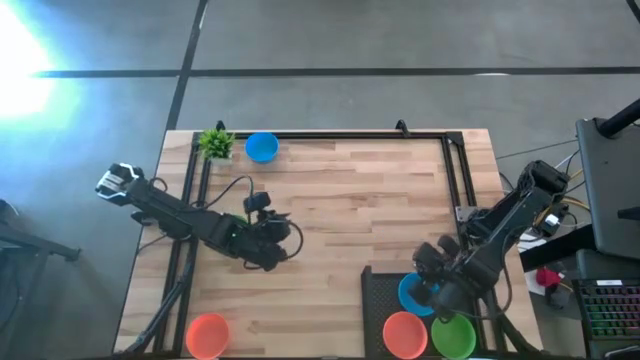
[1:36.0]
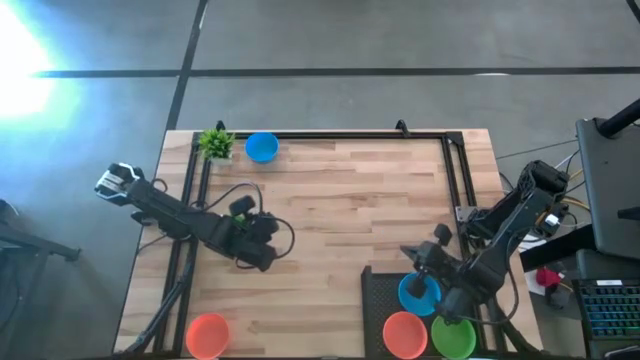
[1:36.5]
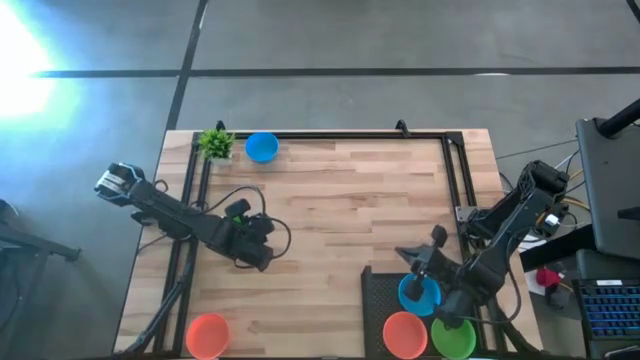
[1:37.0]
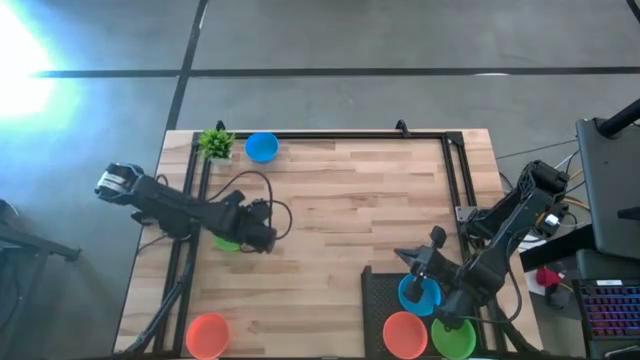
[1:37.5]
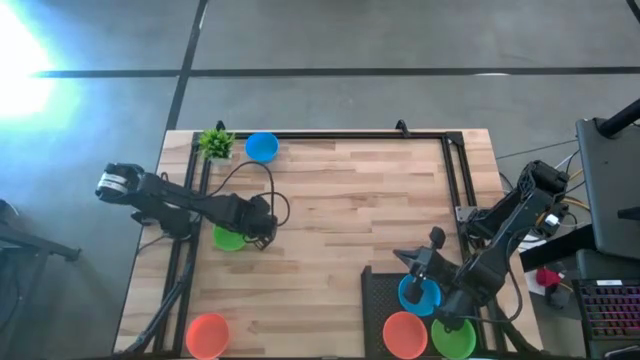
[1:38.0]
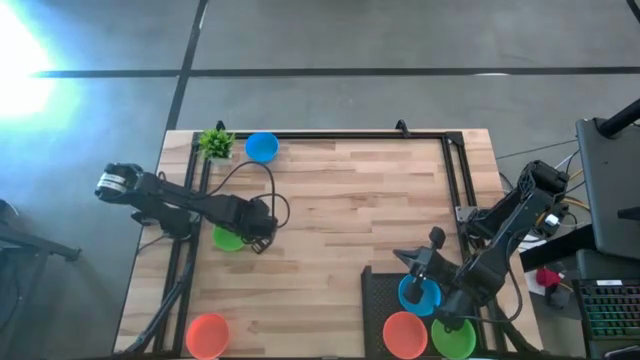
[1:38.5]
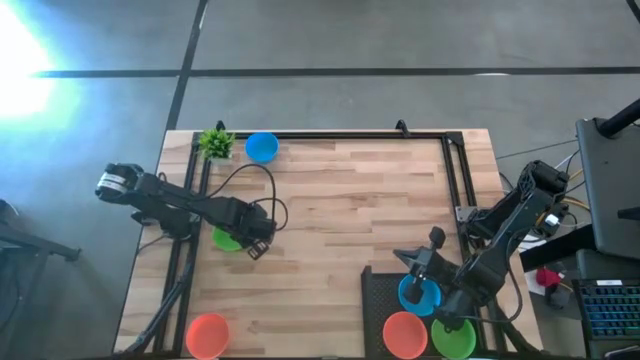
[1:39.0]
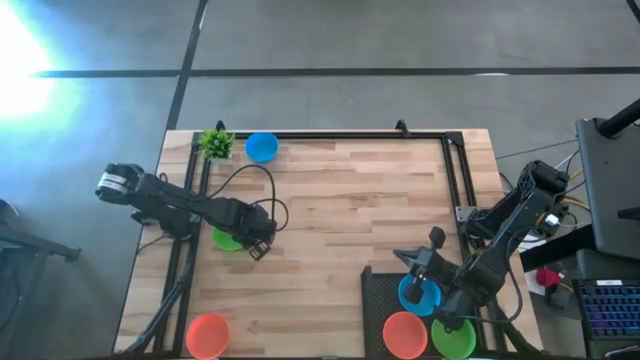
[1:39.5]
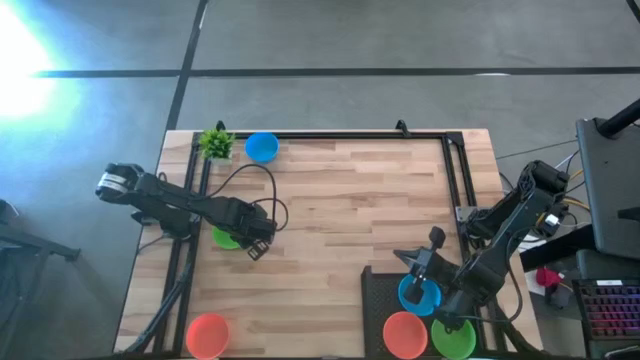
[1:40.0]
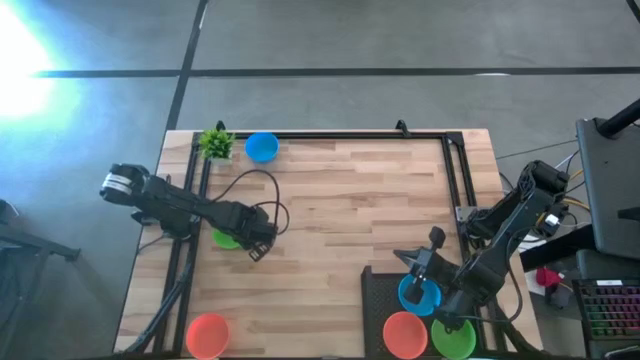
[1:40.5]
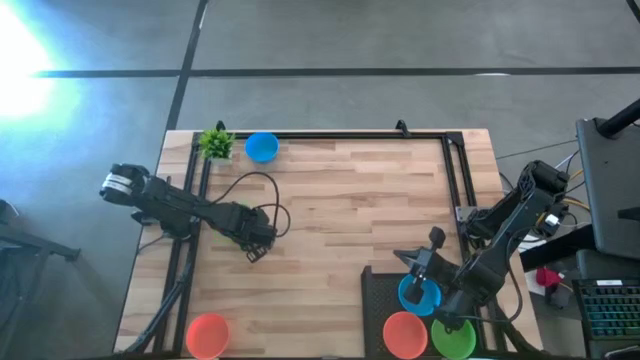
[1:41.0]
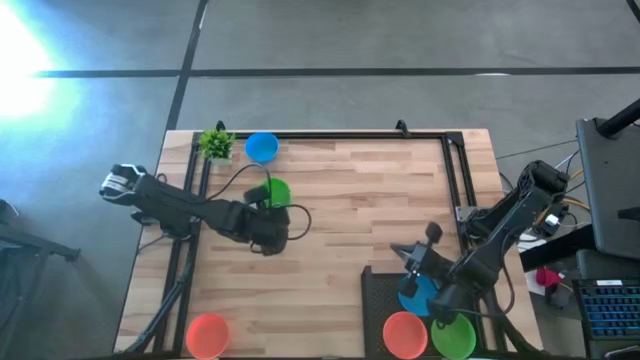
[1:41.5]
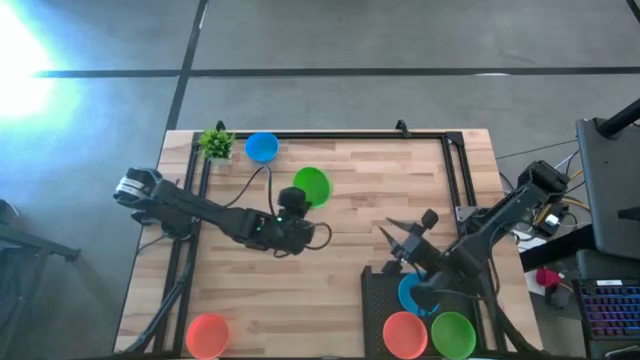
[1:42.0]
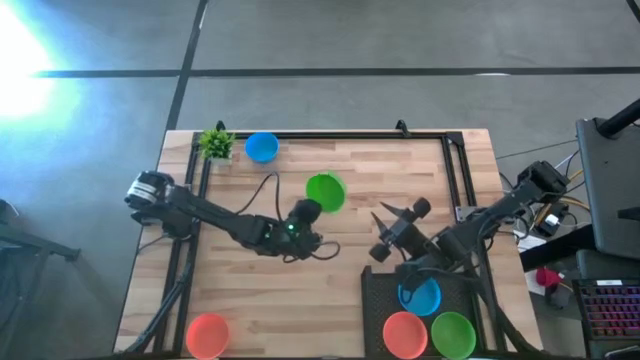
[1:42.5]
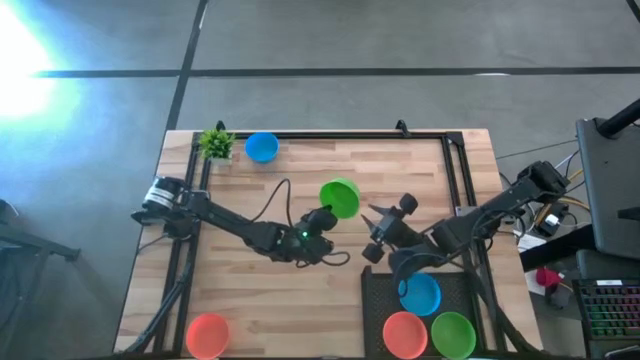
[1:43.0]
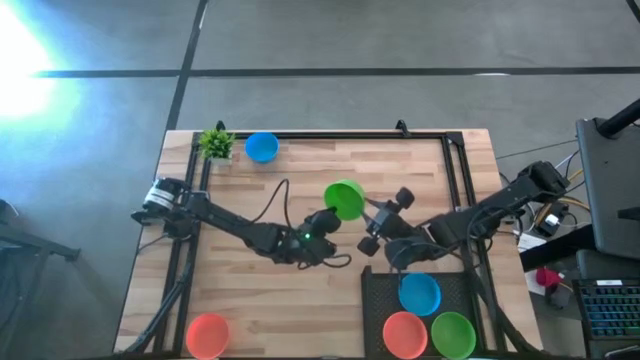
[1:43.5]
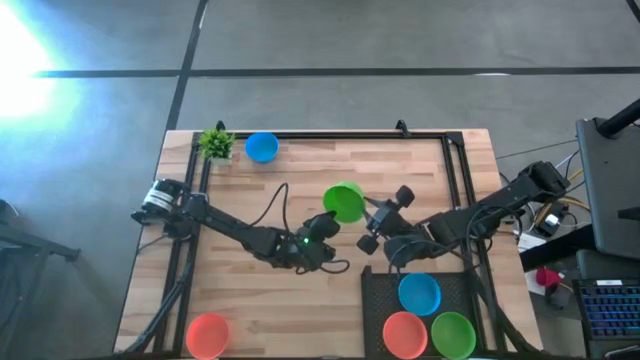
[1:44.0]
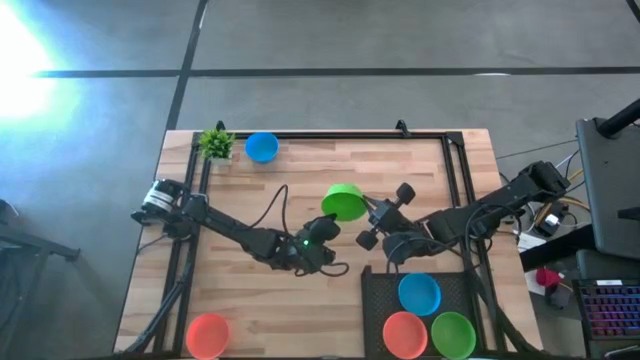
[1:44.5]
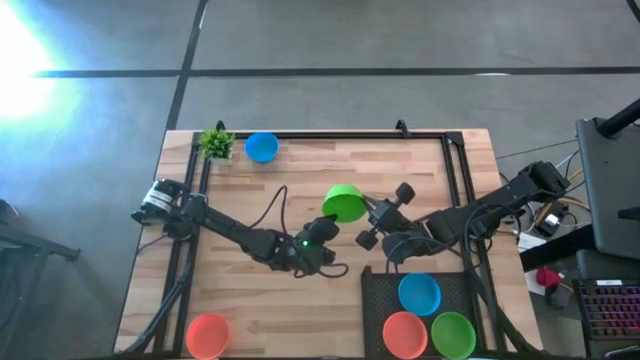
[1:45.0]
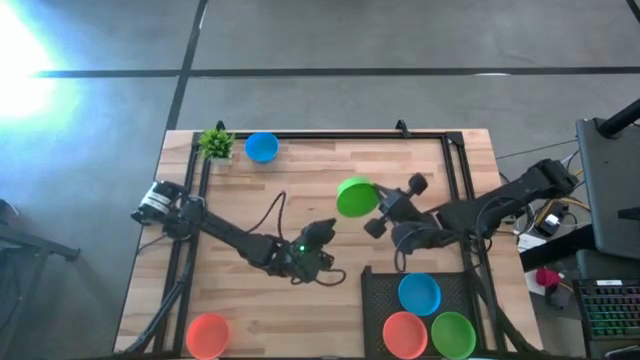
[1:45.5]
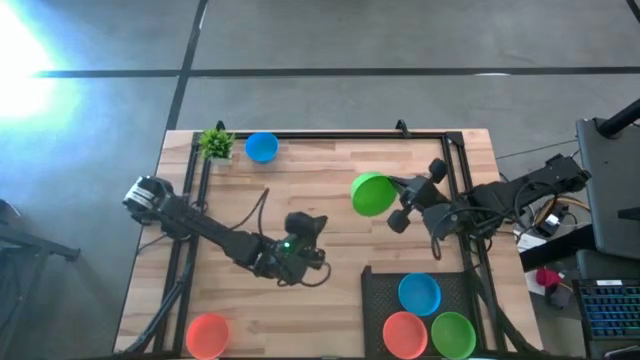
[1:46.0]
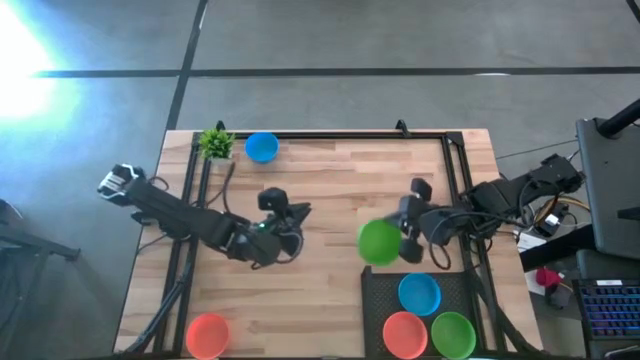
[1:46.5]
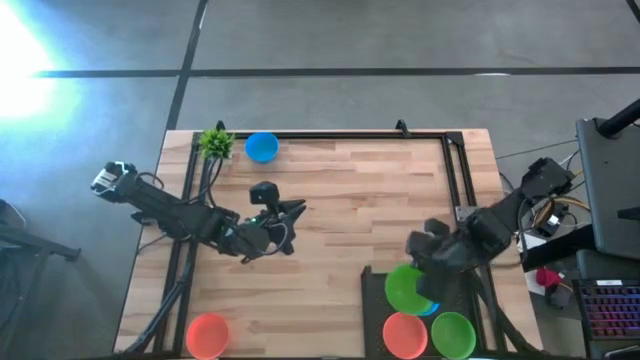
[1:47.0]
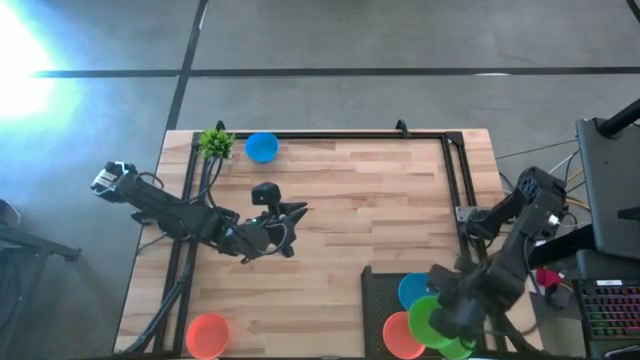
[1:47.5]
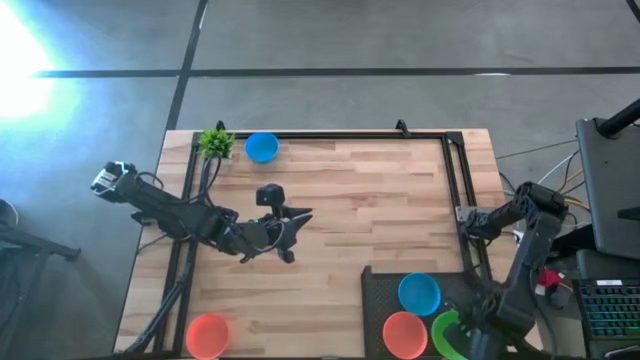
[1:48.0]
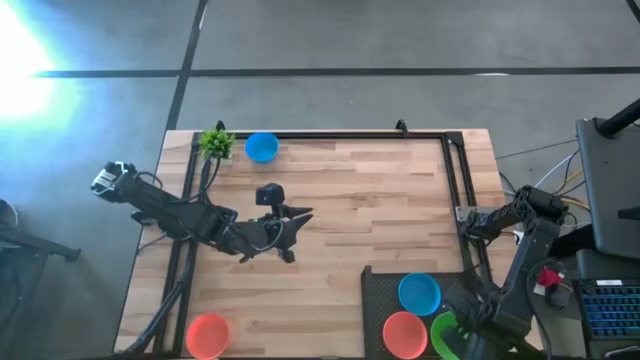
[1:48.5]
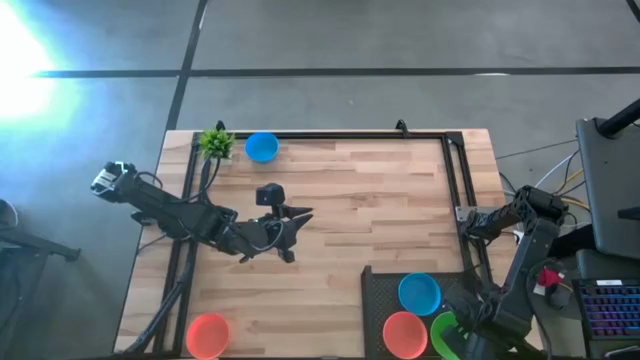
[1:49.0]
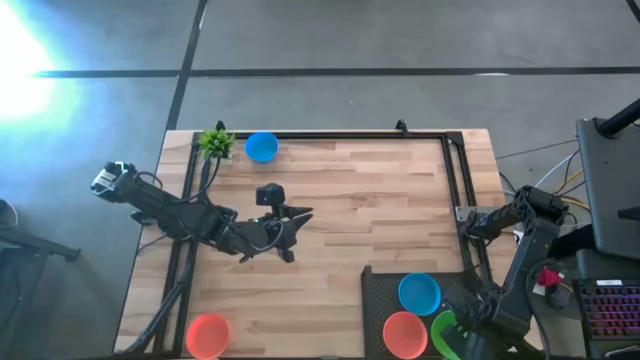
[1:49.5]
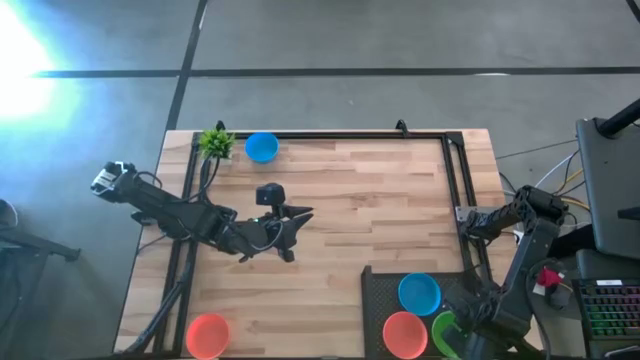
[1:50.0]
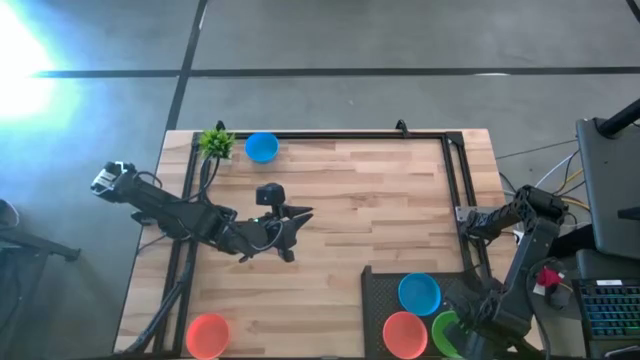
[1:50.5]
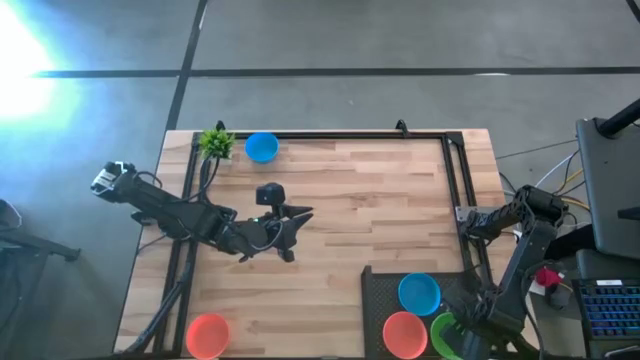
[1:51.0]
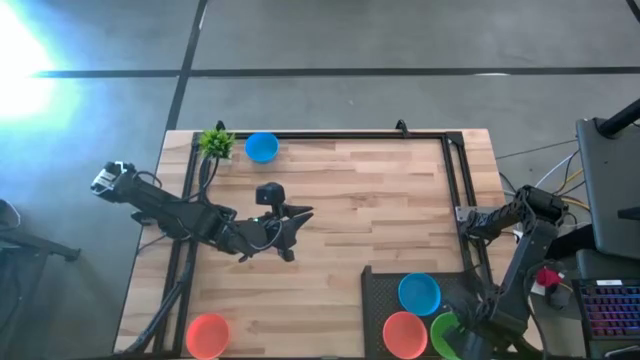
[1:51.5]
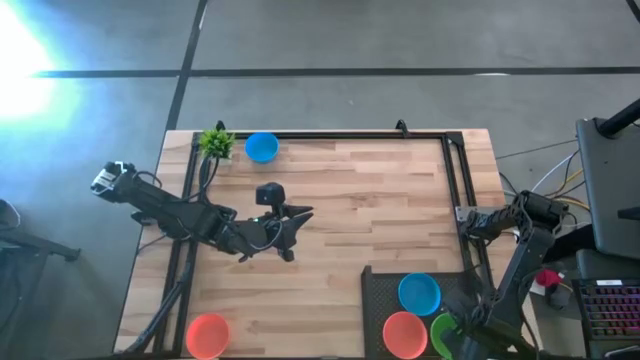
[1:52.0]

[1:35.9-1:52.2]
Task: Pick & Place Mini bowls
Stack the green bowl on the green bowl on the shelf

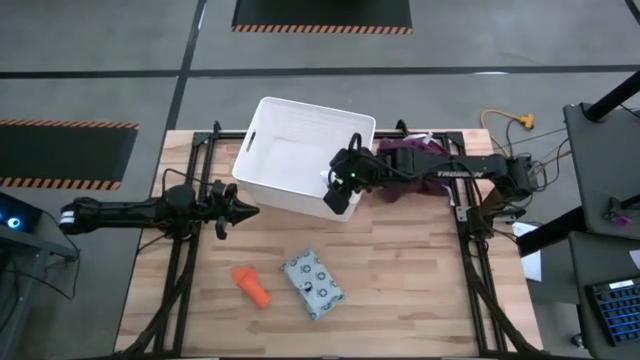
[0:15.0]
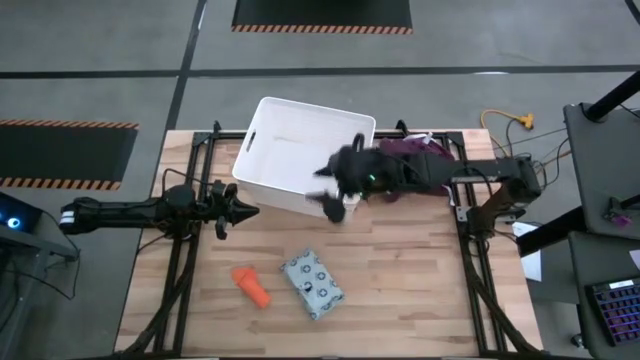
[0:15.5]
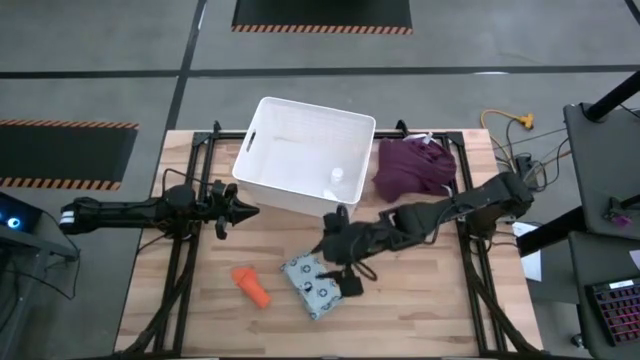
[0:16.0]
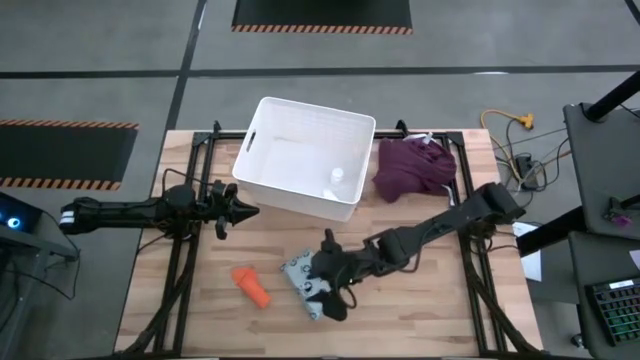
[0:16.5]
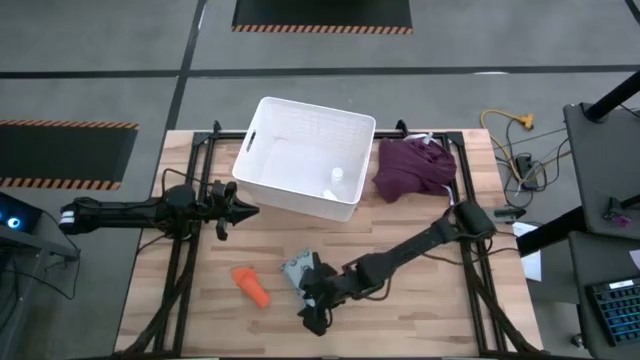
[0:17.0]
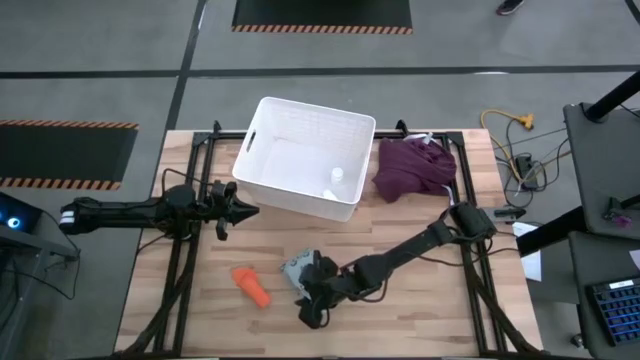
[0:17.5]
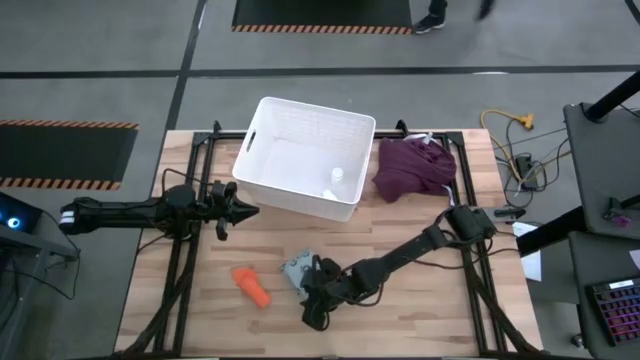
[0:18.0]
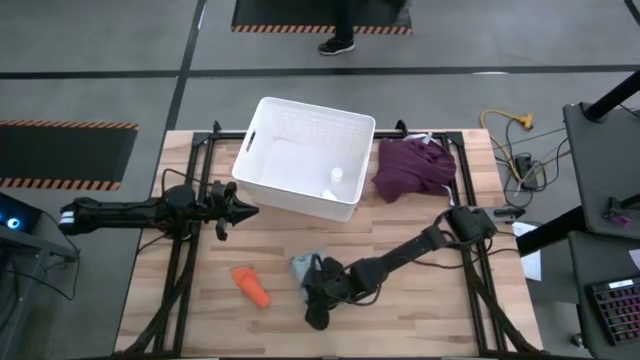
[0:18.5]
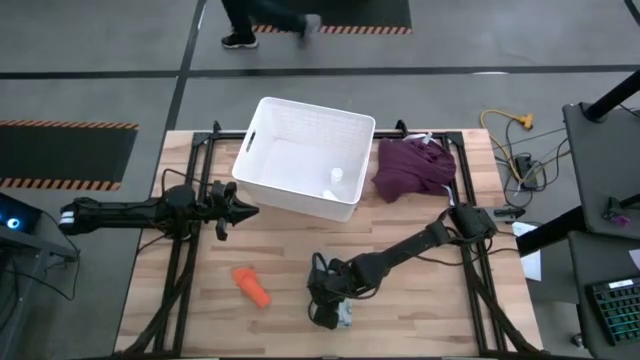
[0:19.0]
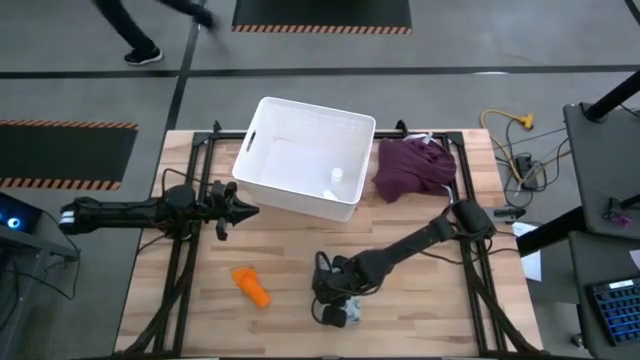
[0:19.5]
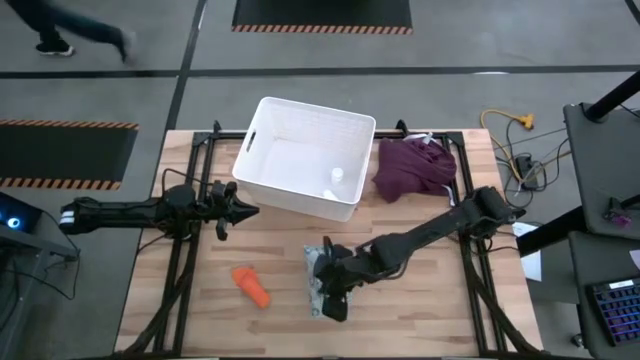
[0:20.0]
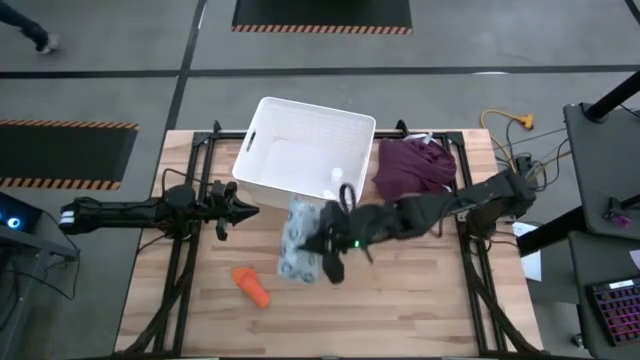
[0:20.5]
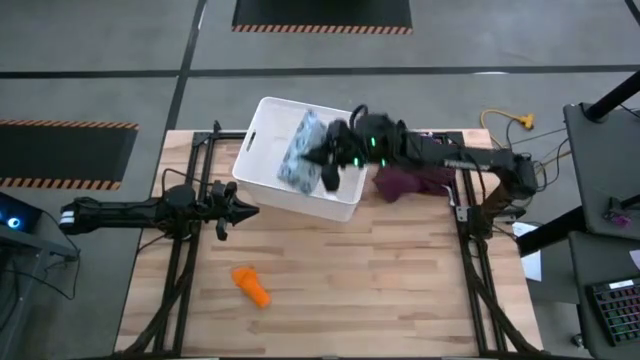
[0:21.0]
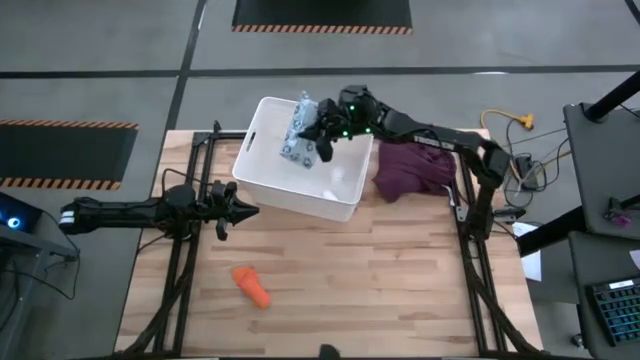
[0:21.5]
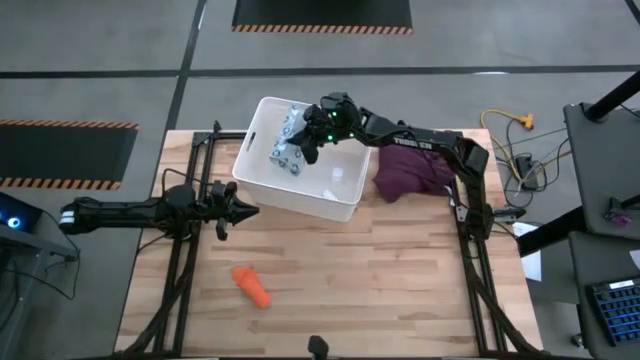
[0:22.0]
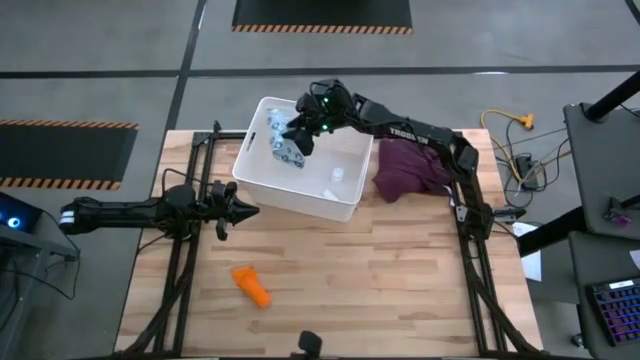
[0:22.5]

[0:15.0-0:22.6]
Task: Pick & place medical supplies in basket/bin
Put the mailer bag into the bin
